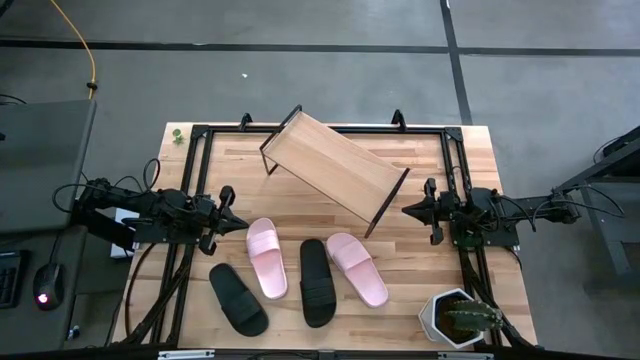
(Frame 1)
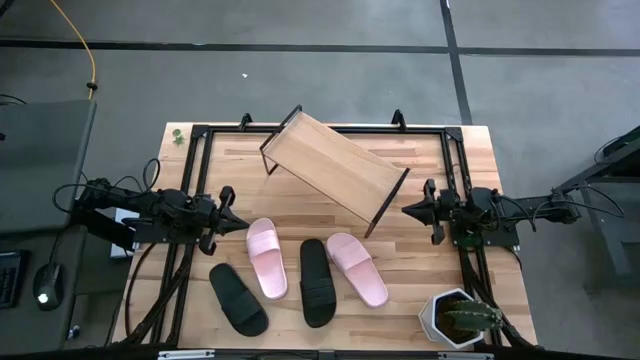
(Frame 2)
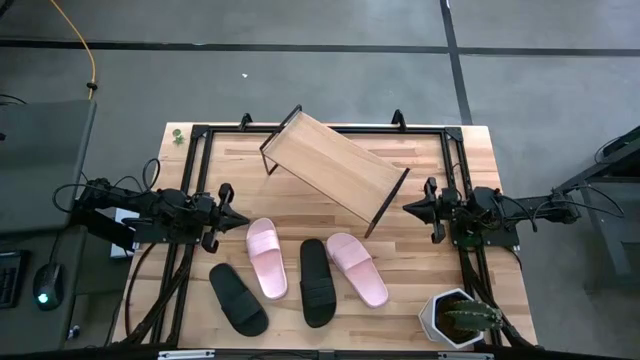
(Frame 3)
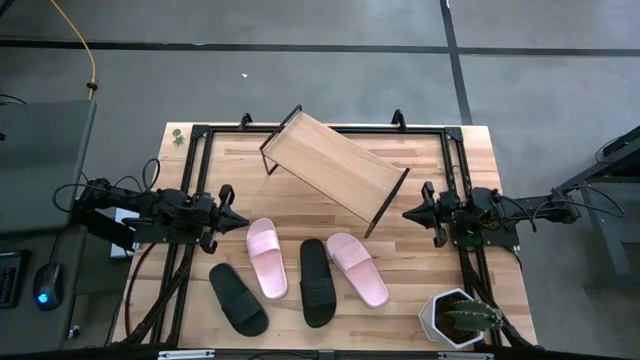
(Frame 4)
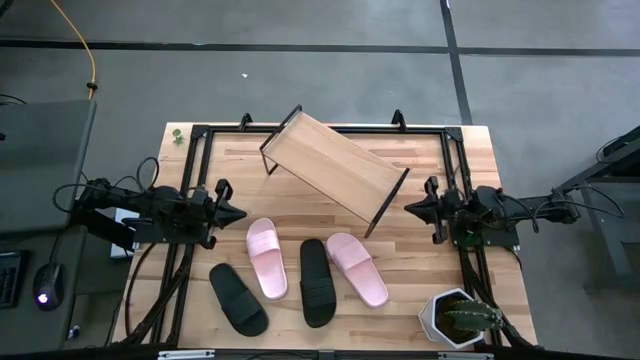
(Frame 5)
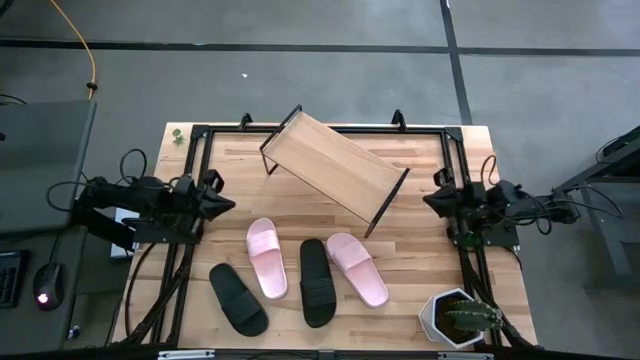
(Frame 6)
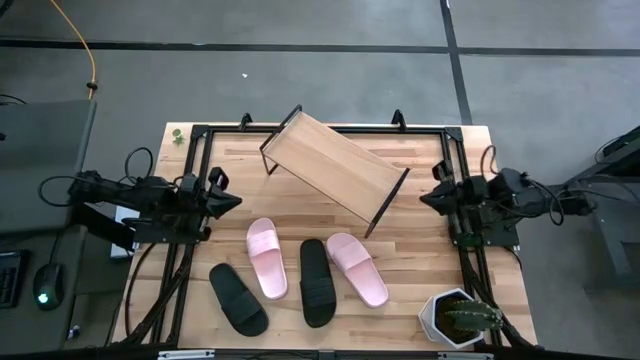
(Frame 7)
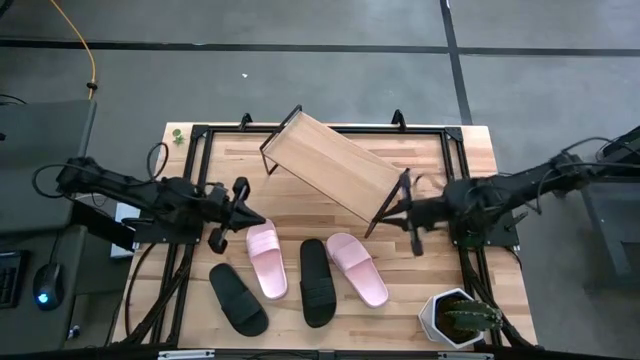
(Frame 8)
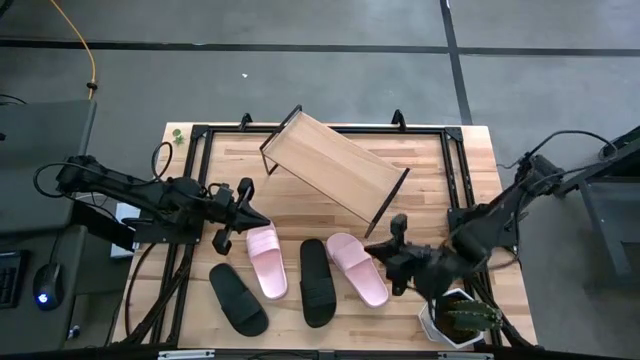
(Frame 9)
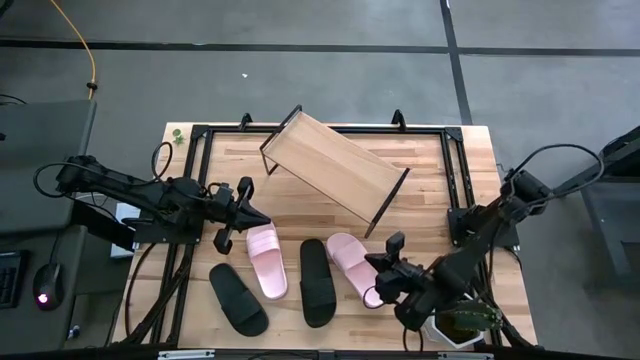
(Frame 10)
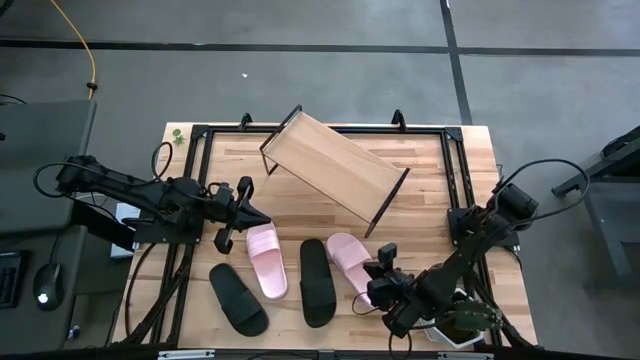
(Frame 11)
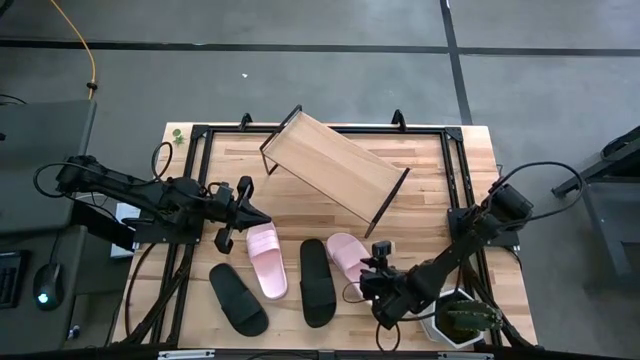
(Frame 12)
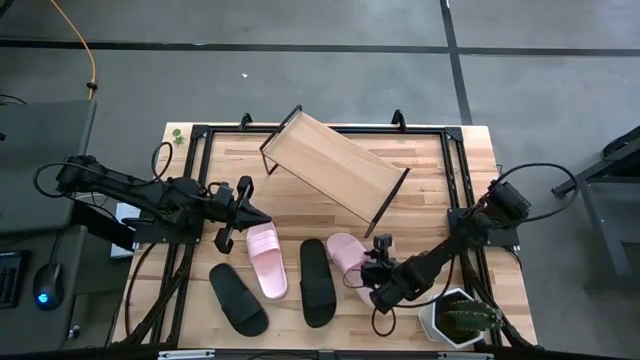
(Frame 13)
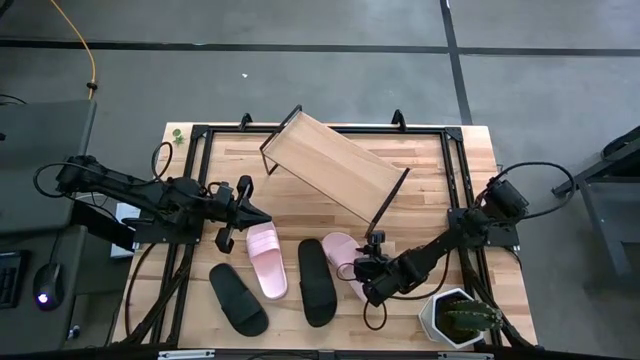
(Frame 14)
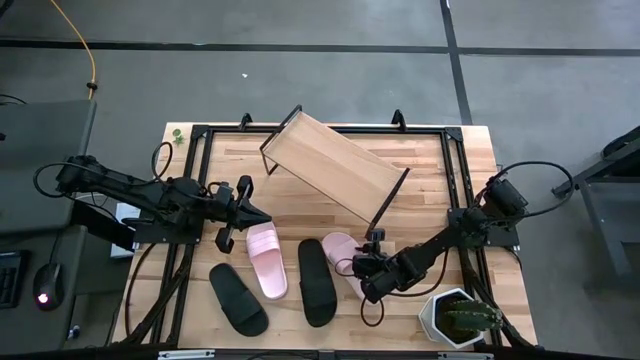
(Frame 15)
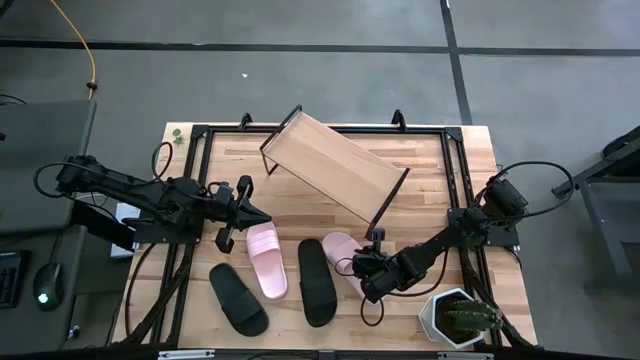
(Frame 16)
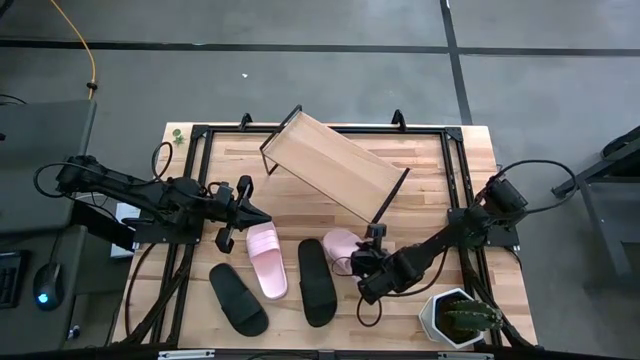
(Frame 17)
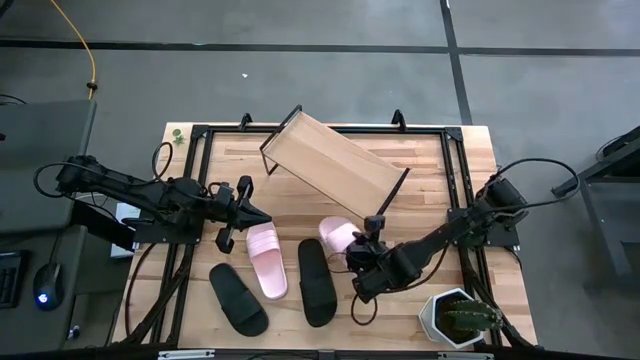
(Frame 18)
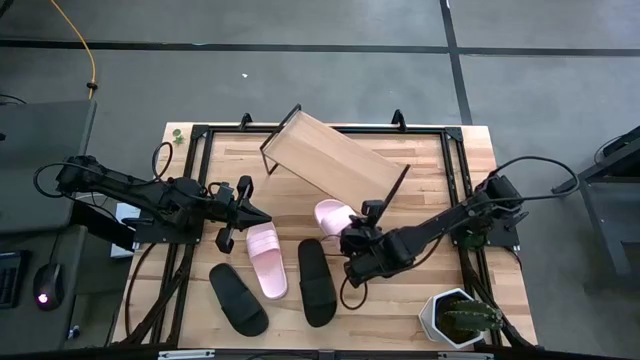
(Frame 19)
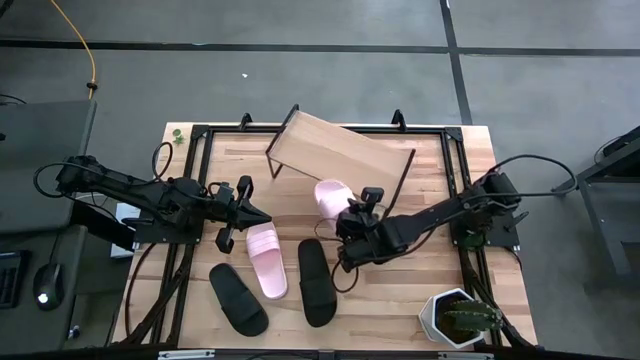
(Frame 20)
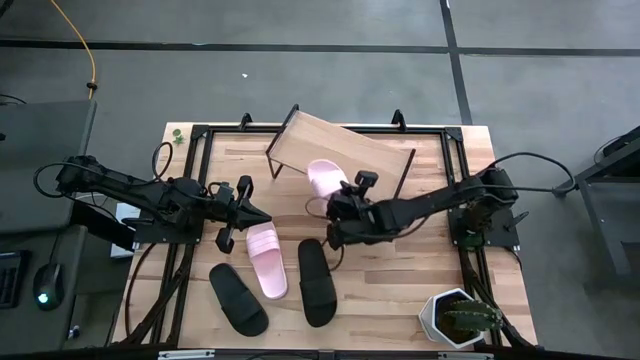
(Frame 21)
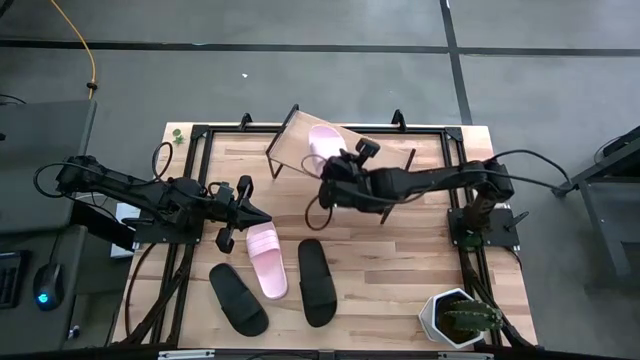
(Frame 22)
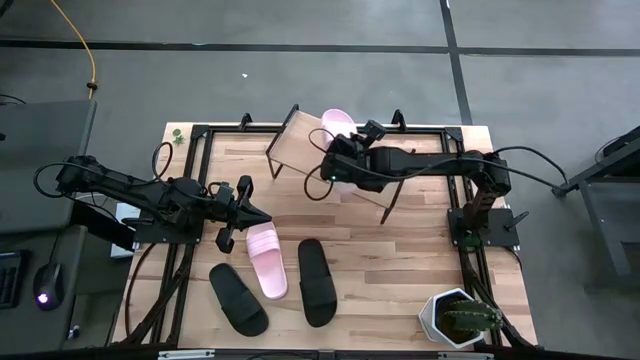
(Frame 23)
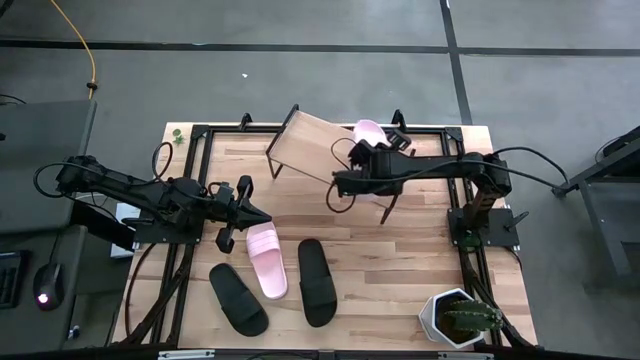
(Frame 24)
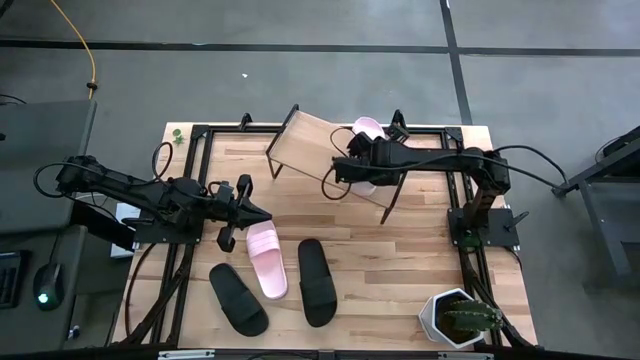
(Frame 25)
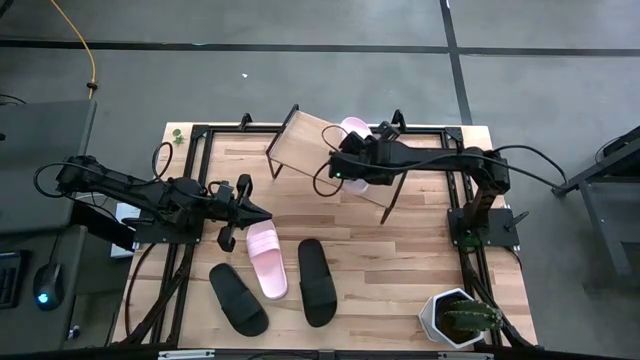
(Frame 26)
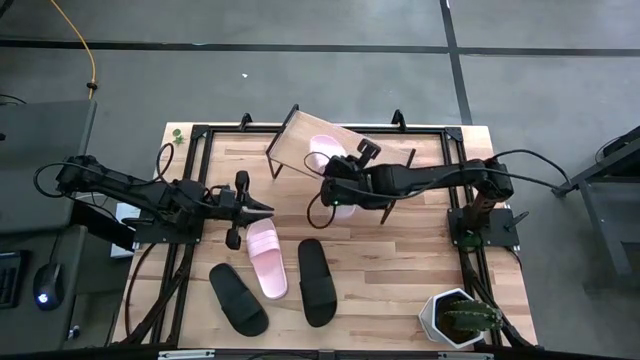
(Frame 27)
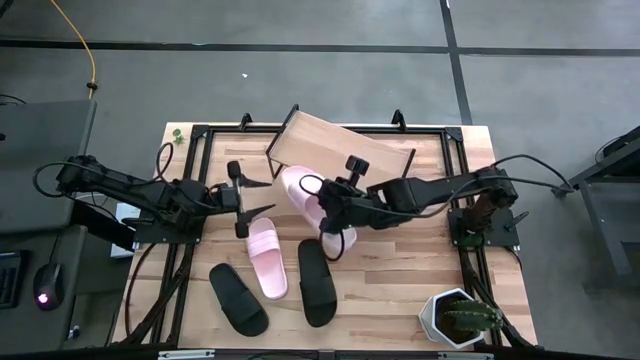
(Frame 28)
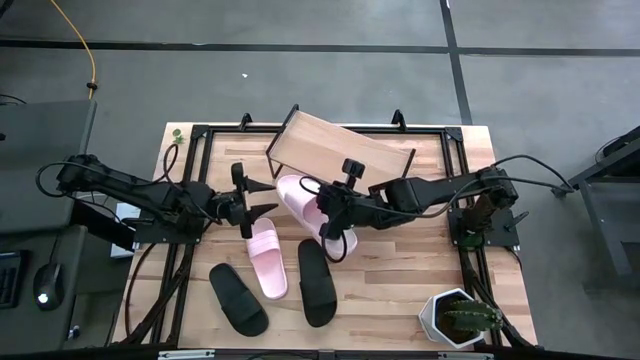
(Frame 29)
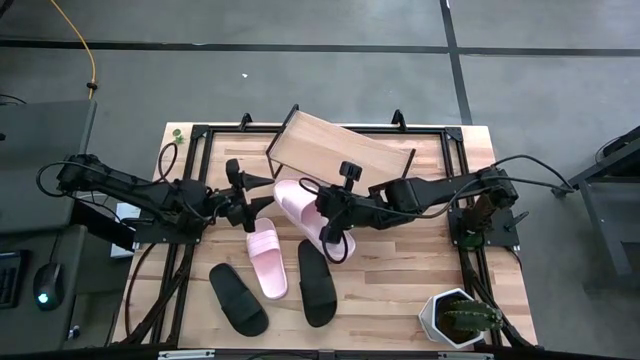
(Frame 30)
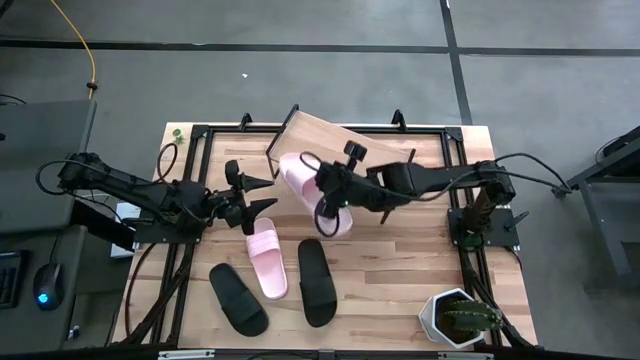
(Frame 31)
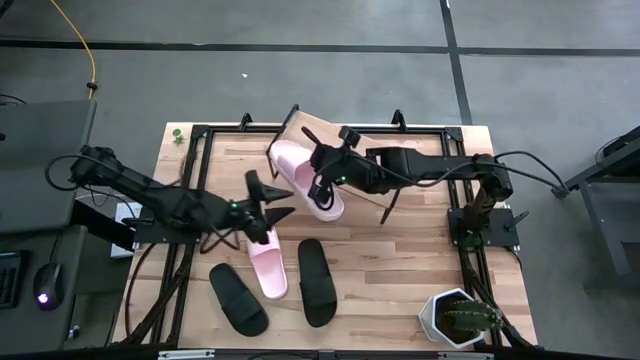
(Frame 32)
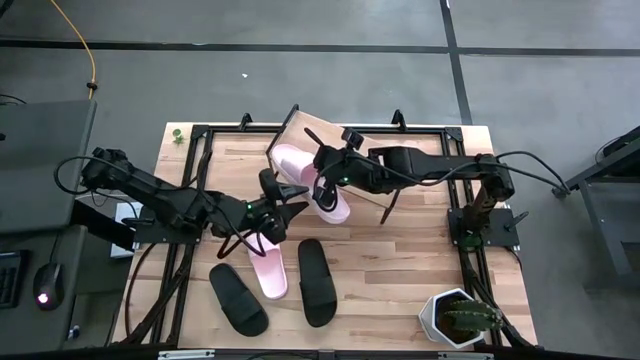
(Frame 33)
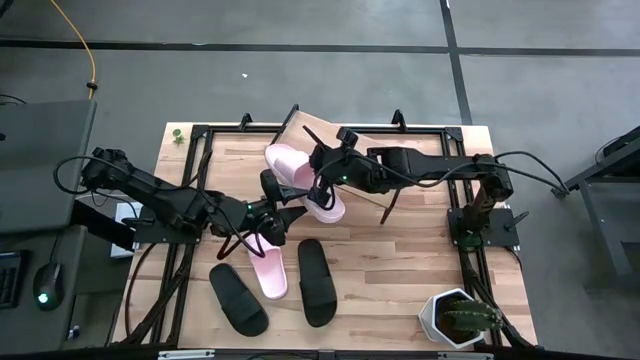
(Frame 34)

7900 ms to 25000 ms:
Task: Pick and place slides into the shelf
Put the right pink slide on the shelf

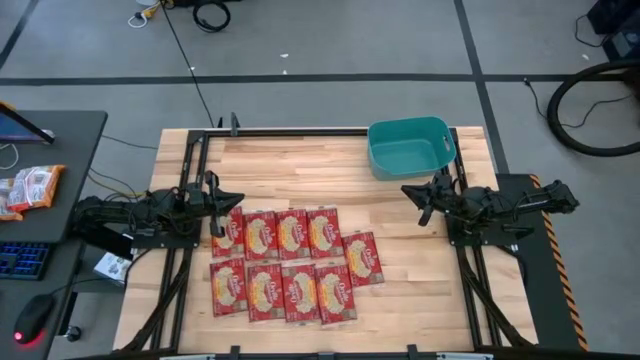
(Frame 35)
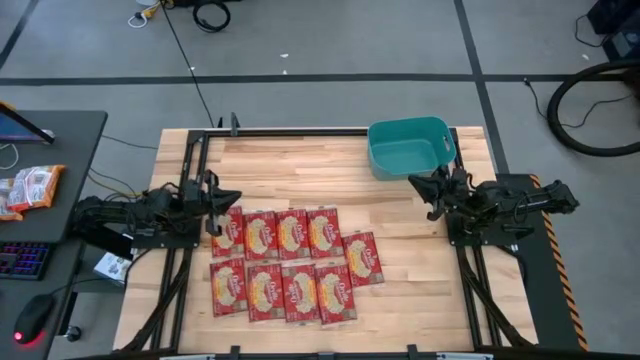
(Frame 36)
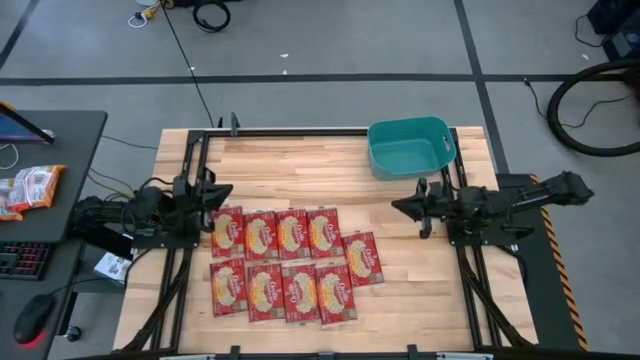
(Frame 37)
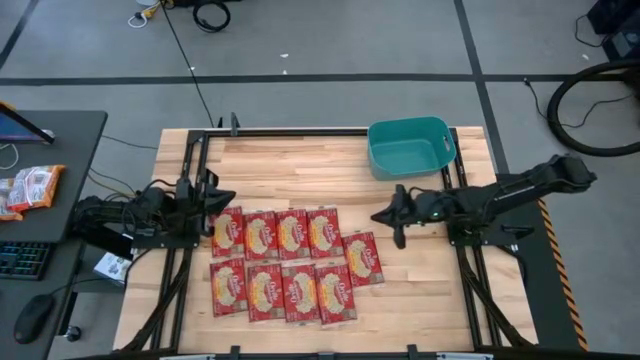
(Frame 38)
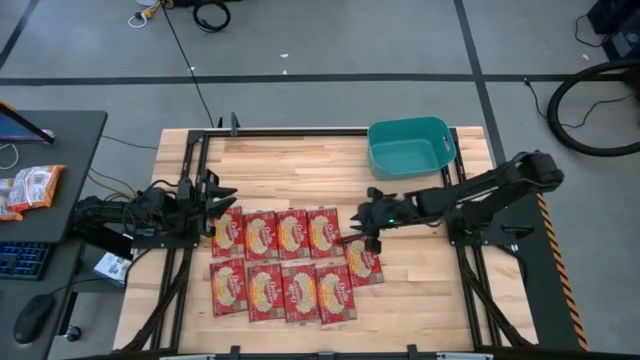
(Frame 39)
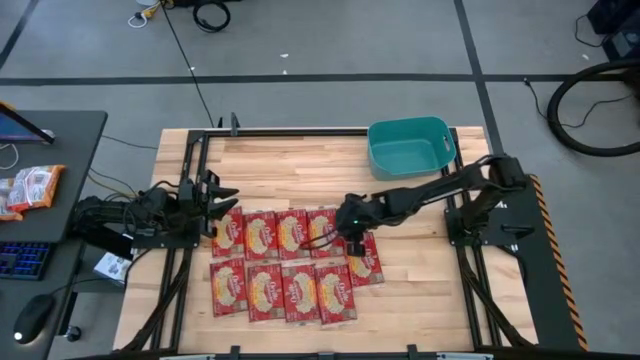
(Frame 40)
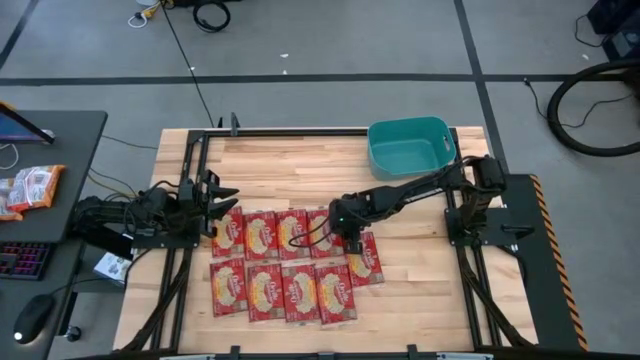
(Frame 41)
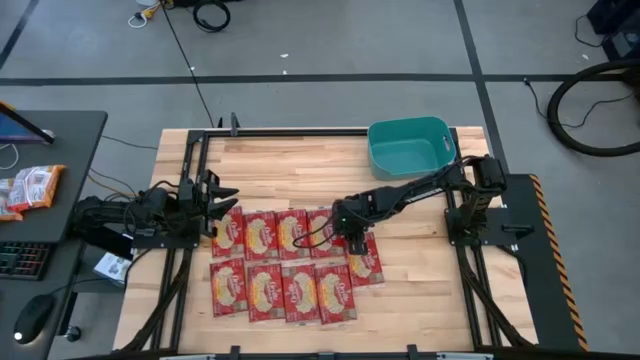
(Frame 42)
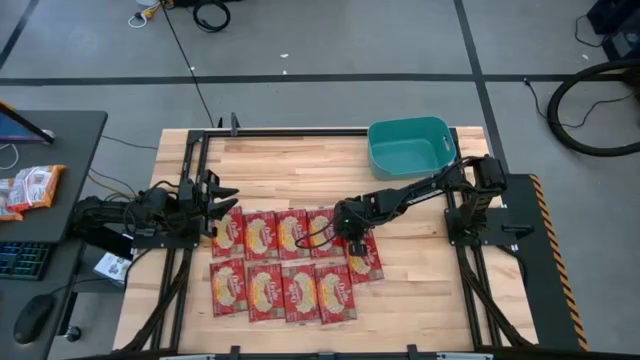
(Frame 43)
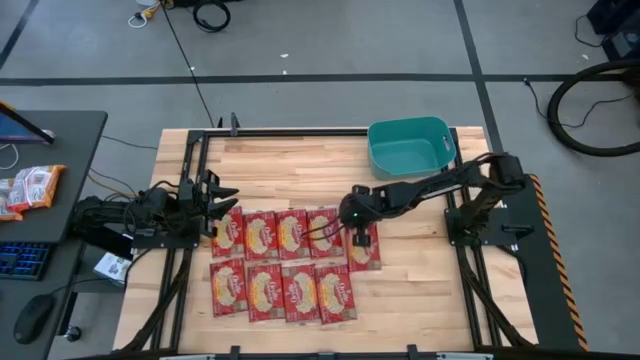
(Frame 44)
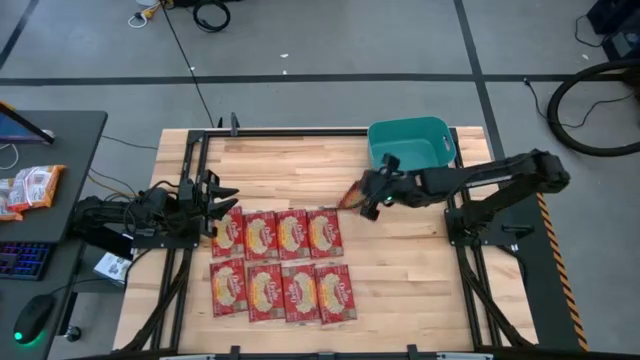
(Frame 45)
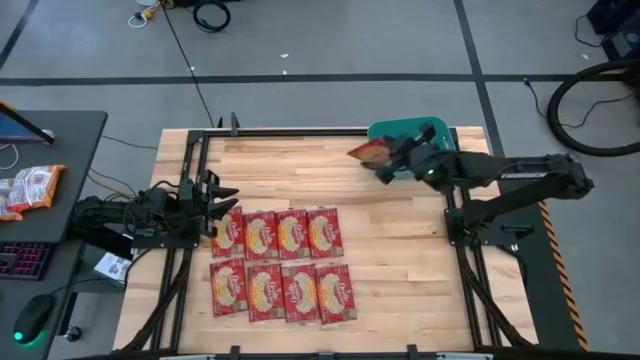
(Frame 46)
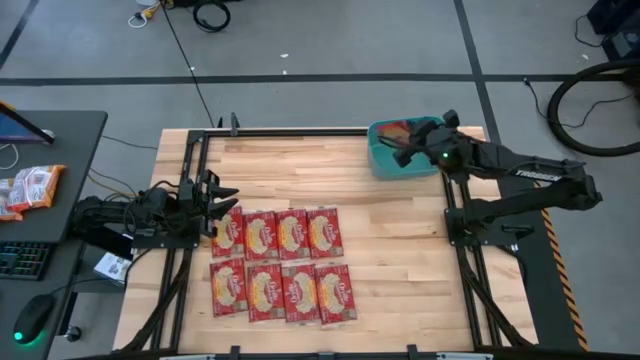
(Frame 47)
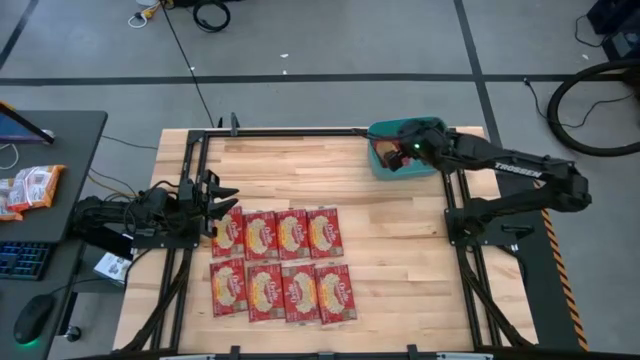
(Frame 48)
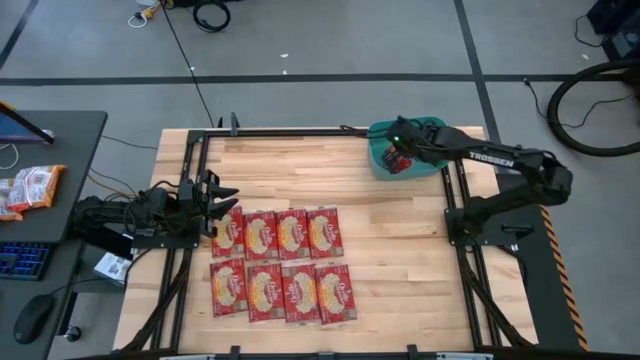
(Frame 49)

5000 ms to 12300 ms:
Task: Sort popcorn bags into baskets
Put the red popcorn bag into the green bin
